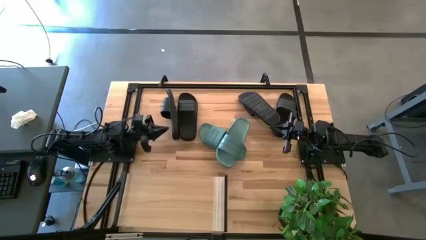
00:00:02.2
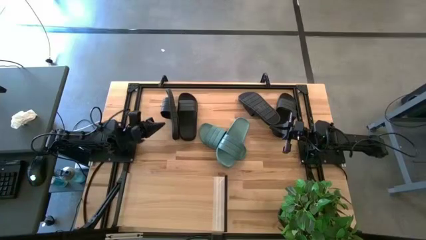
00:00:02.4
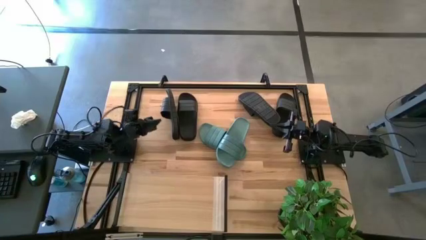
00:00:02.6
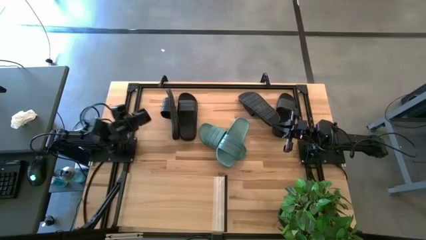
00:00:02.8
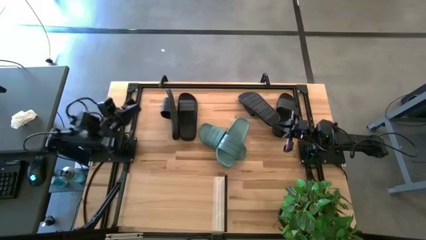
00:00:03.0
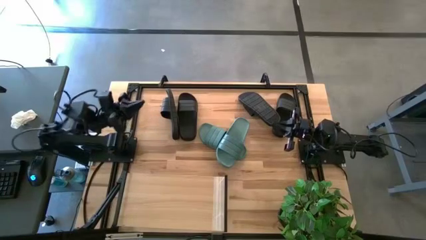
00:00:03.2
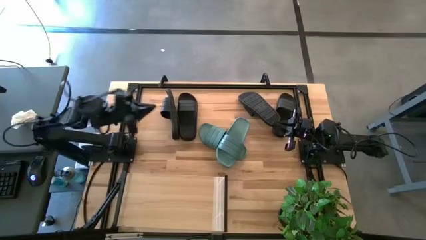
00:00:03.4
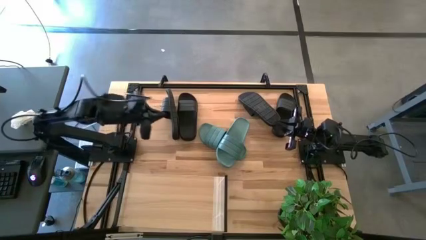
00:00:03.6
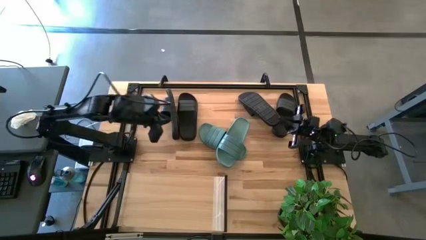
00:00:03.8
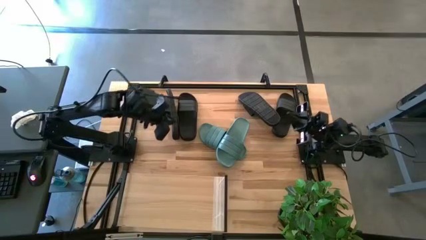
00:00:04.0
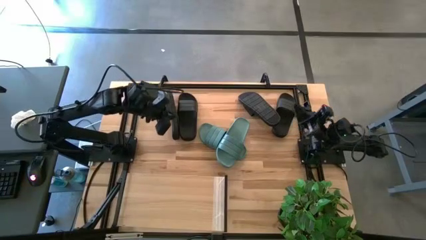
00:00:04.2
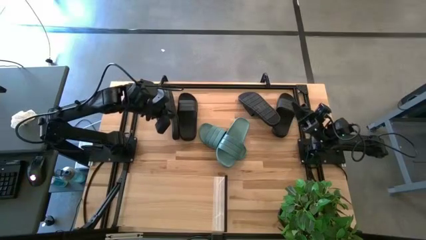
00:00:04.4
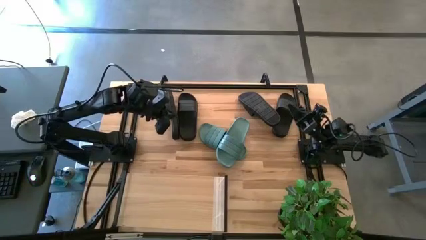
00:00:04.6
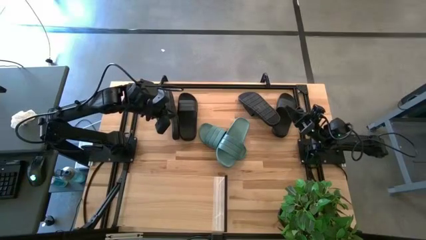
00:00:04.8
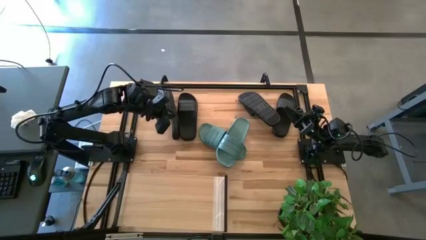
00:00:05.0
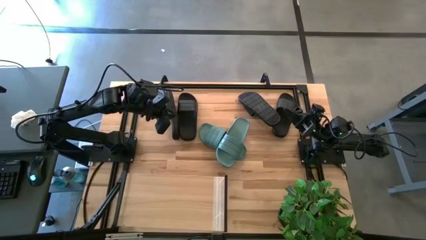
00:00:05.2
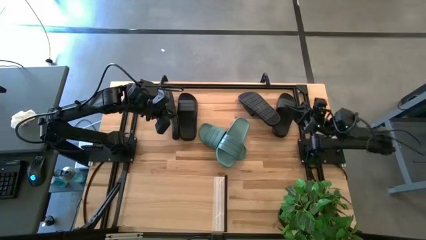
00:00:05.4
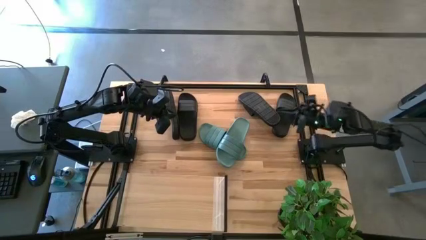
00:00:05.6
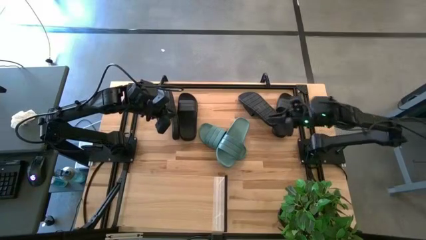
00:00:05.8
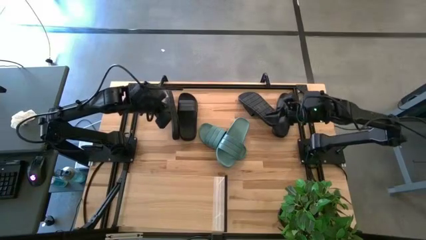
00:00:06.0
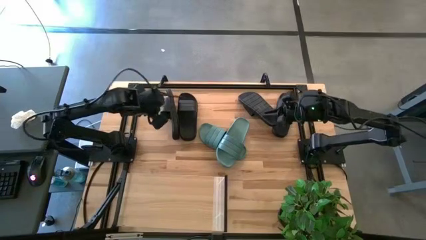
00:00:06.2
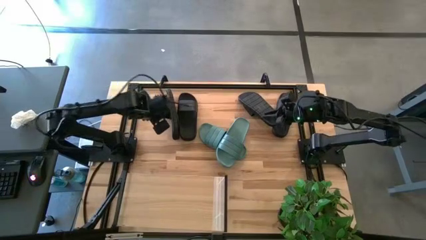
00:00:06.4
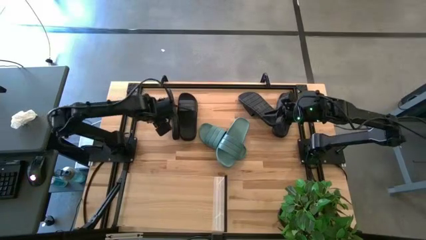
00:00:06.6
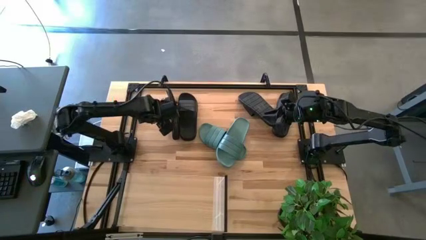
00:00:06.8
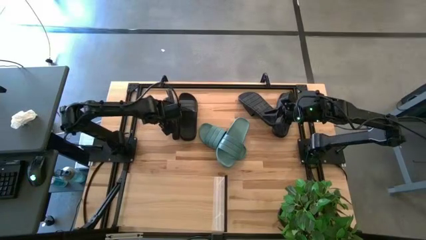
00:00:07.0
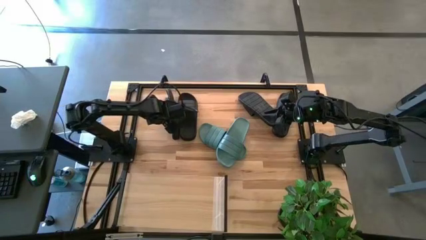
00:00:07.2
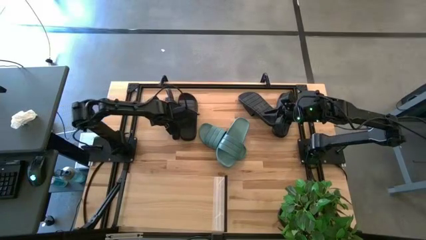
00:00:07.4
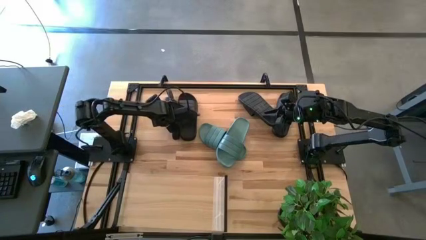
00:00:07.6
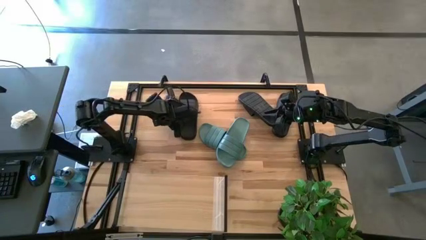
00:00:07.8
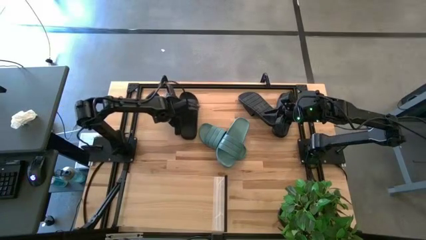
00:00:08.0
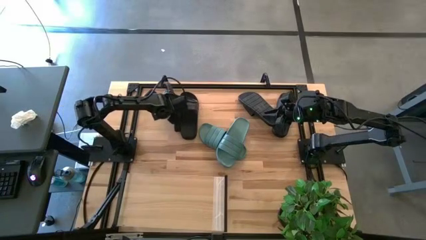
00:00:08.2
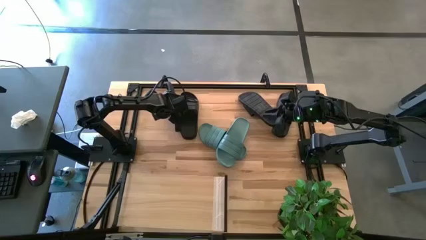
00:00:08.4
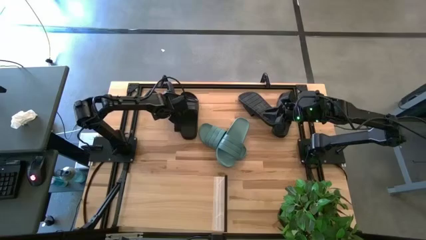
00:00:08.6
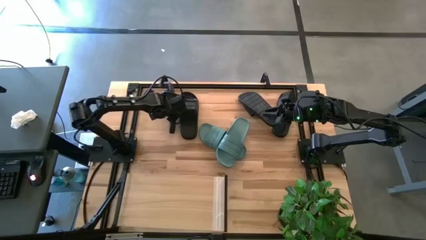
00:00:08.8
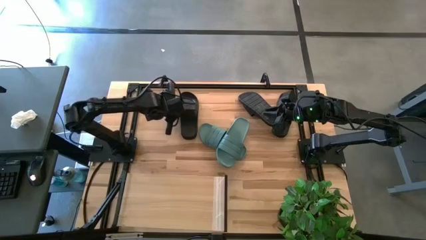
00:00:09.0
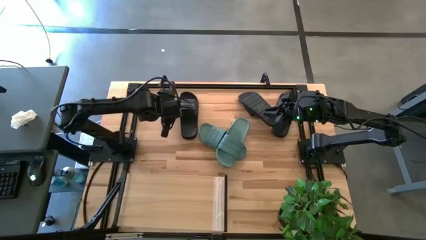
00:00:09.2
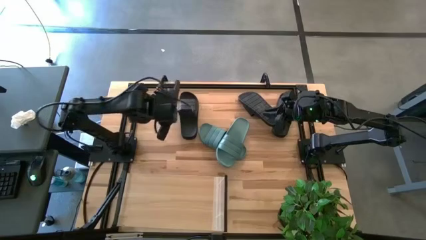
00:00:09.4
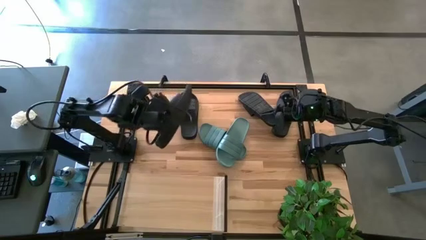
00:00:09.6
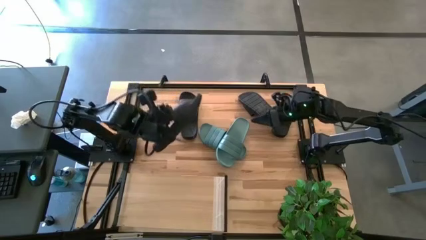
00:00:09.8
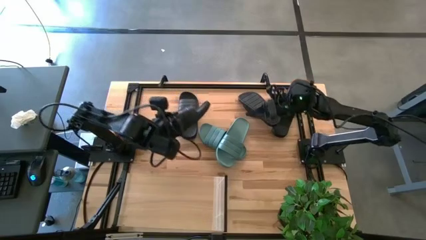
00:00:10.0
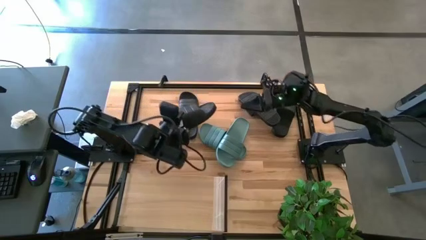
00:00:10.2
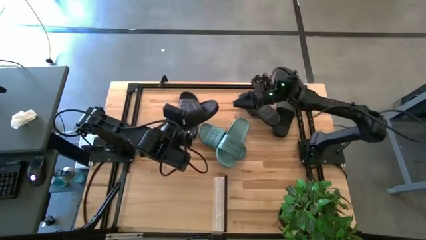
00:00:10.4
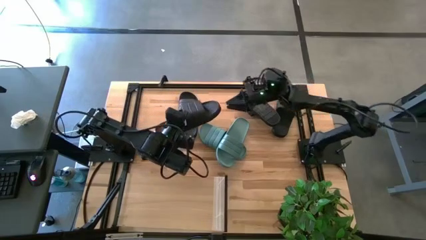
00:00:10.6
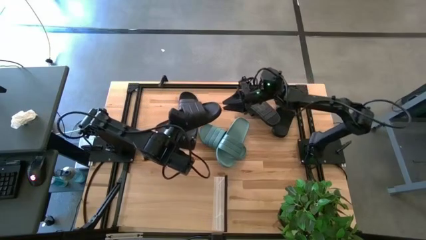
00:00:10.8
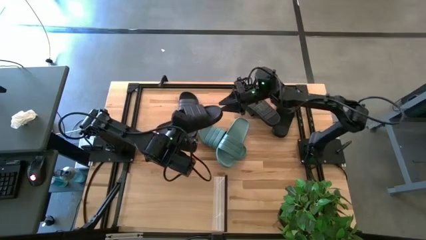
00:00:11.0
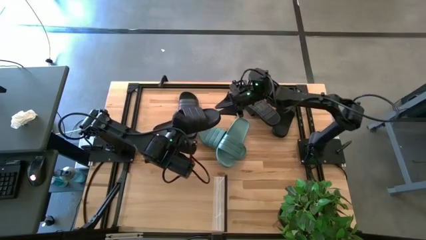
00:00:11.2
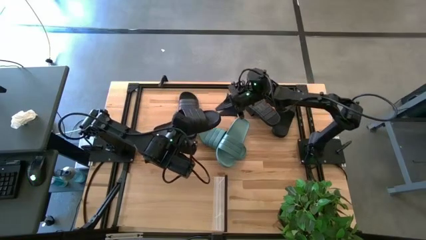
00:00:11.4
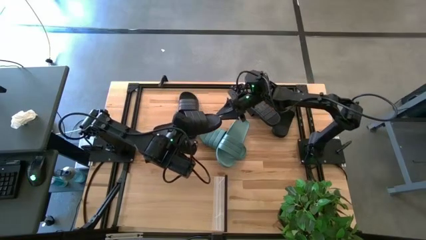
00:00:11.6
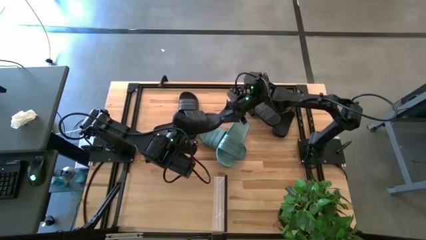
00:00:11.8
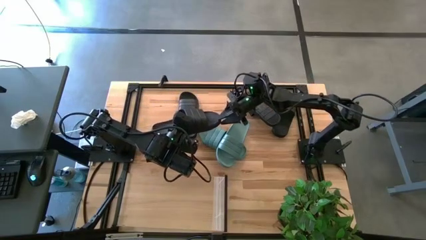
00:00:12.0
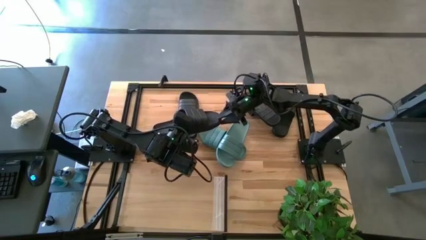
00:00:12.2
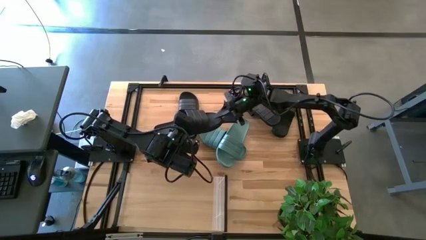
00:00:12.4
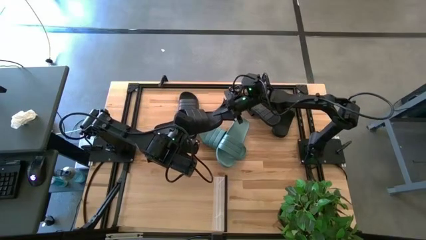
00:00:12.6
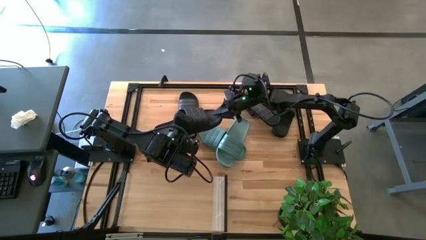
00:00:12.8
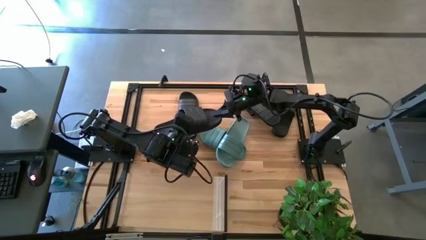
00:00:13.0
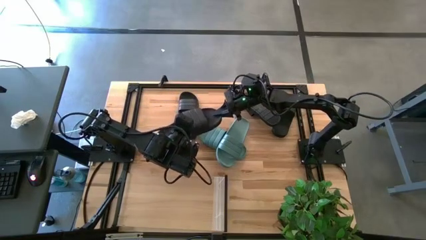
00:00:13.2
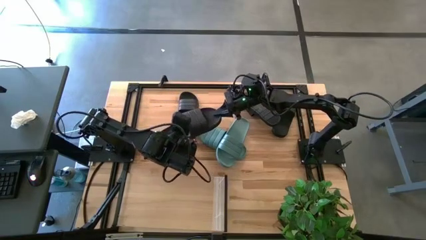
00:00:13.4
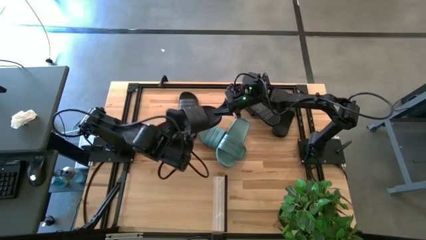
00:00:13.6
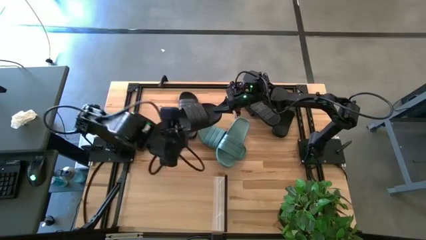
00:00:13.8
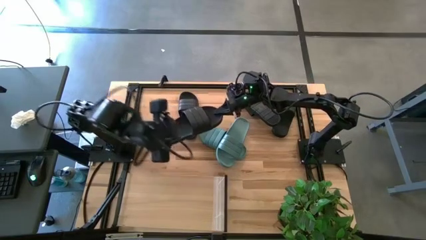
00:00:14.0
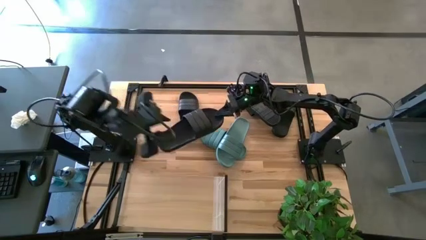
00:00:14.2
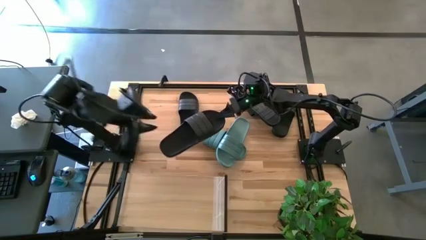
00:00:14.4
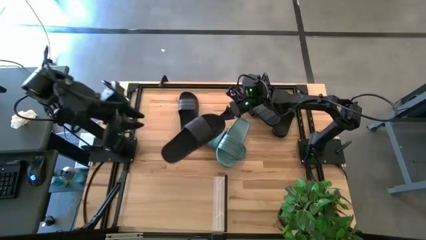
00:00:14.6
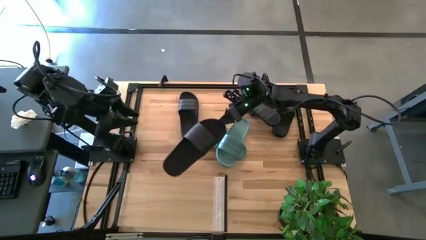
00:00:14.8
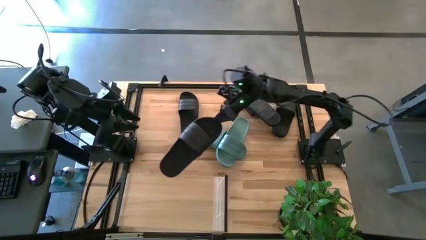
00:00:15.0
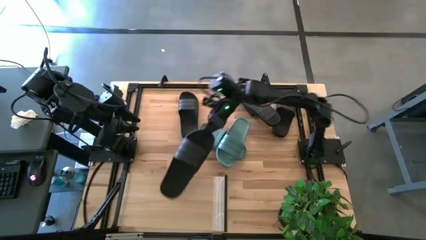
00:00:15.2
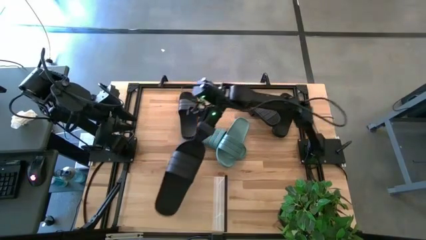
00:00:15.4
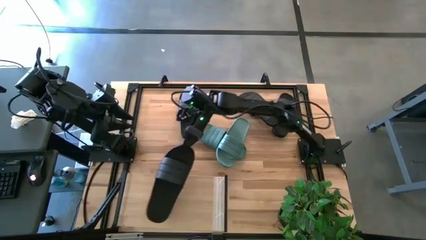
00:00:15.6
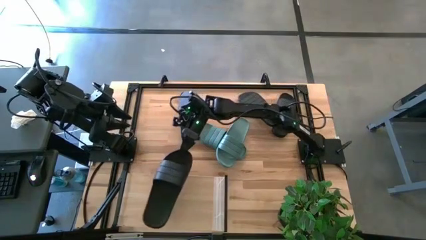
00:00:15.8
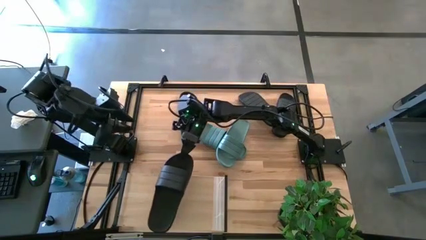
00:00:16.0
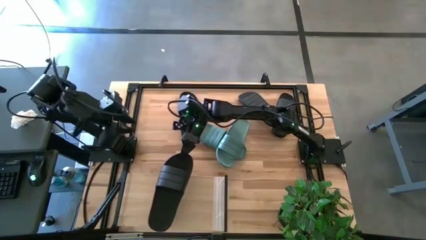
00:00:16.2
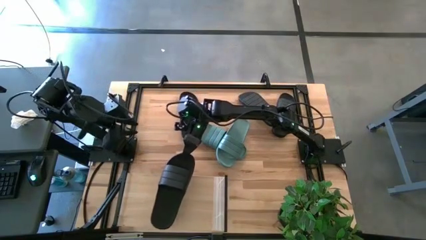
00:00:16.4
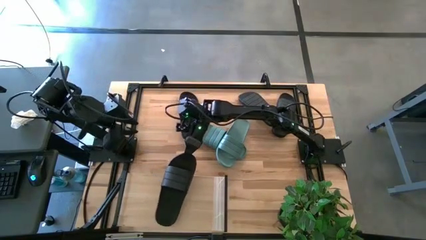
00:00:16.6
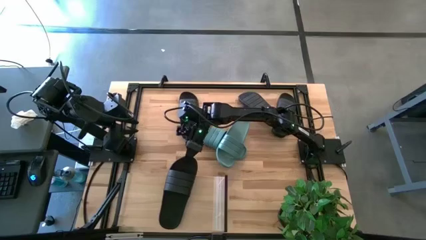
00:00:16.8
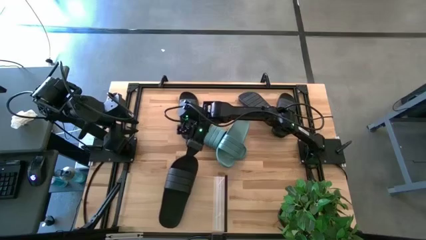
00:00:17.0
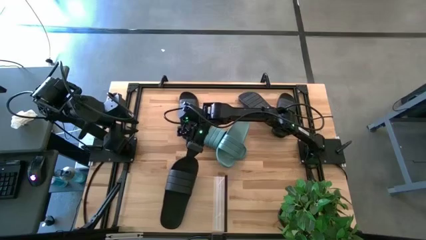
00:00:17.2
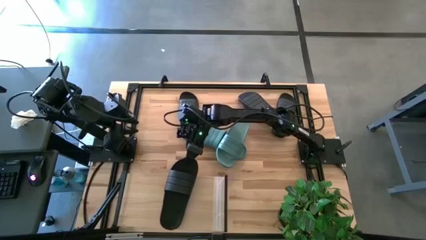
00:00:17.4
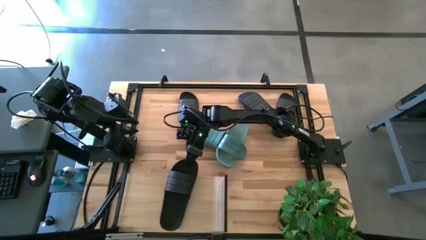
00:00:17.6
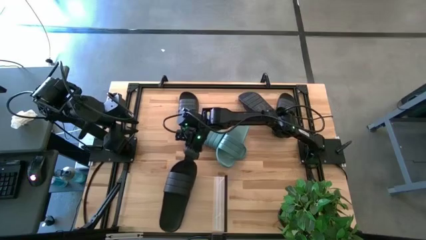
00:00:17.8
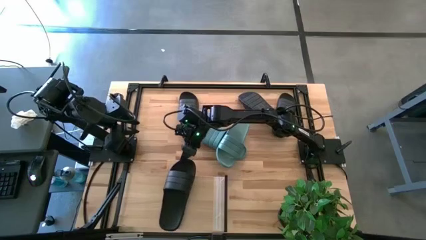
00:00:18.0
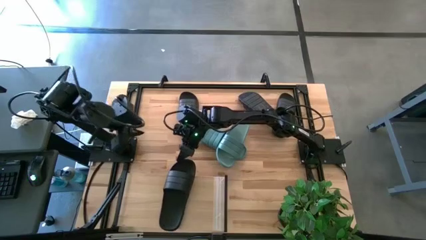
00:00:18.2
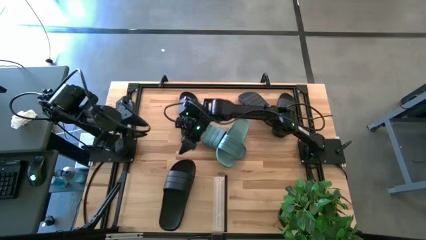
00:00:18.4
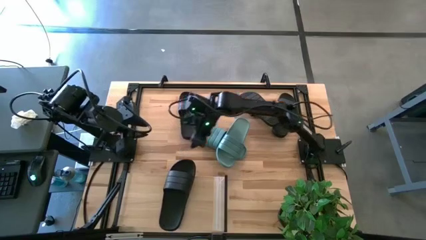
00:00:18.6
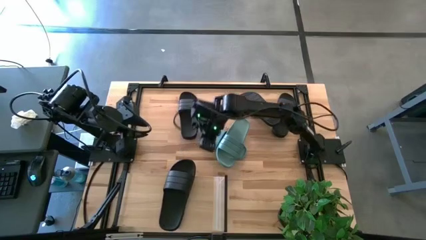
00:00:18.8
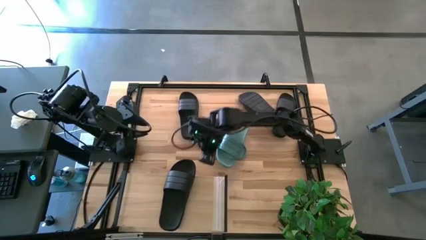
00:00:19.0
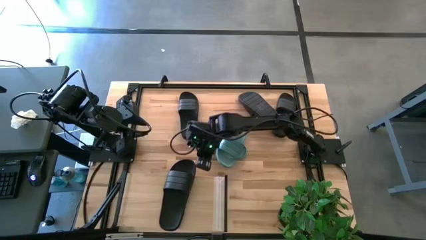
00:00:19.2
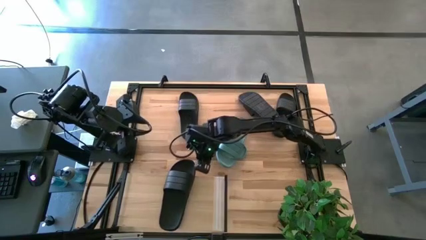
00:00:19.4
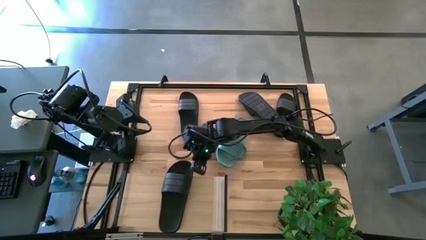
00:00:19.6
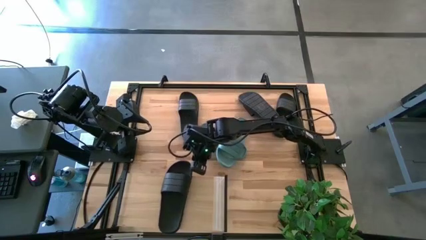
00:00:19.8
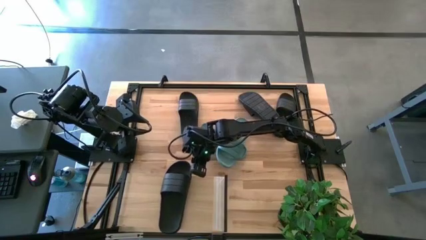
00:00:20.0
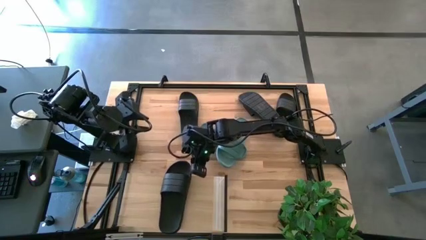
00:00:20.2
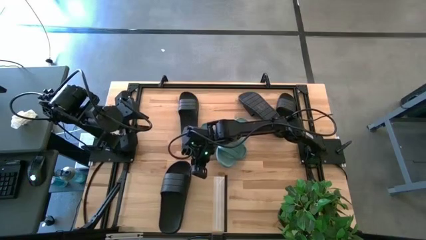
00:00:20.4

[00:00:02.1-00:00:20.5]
Task: Pick and place slides into the shelf
Put the black slipper on the shelf
